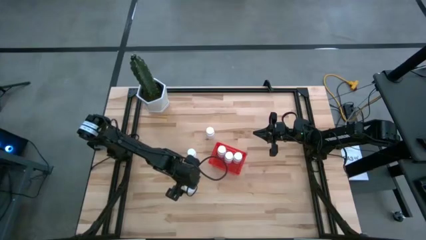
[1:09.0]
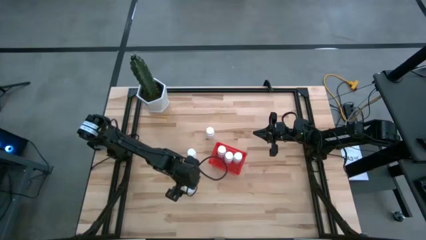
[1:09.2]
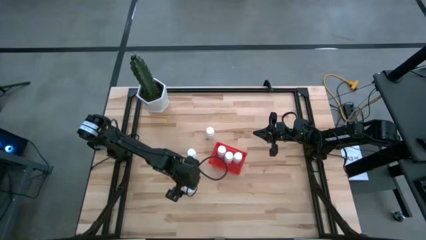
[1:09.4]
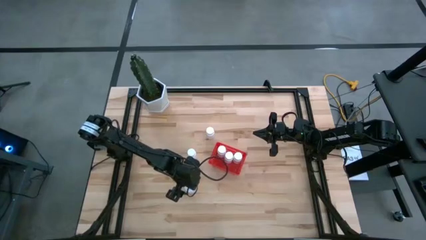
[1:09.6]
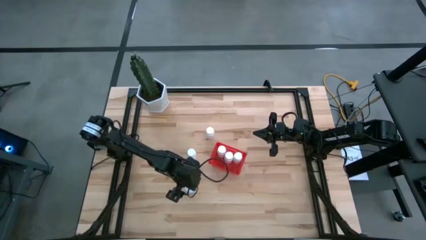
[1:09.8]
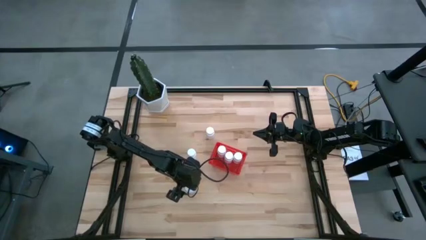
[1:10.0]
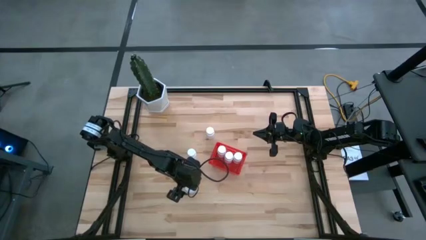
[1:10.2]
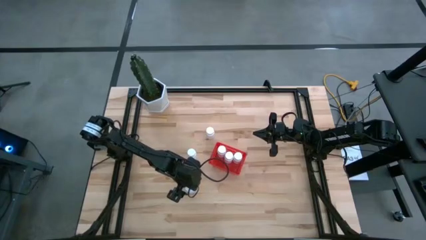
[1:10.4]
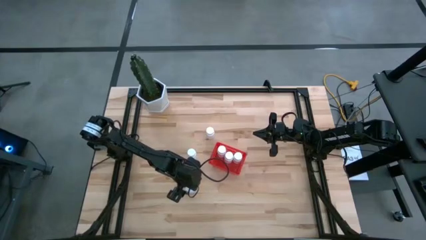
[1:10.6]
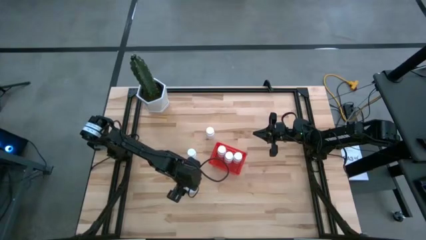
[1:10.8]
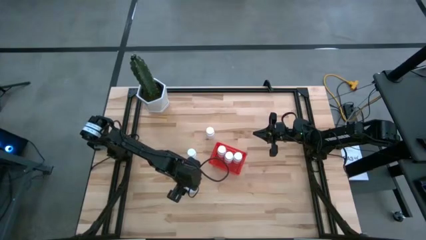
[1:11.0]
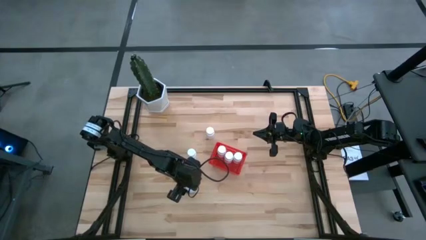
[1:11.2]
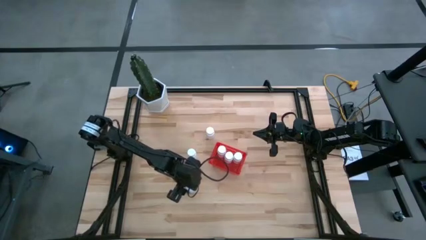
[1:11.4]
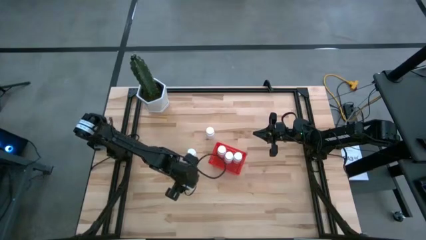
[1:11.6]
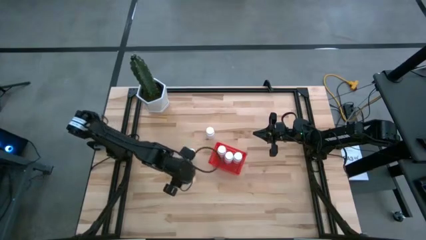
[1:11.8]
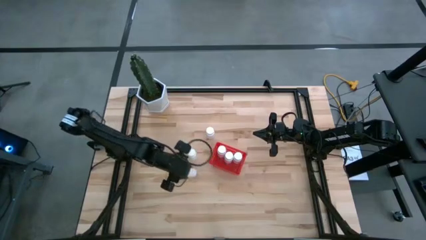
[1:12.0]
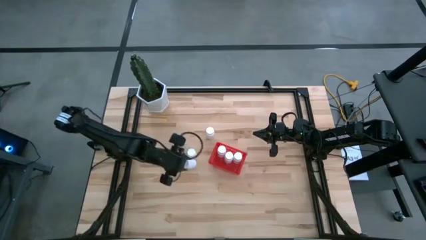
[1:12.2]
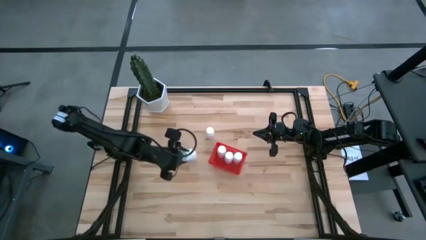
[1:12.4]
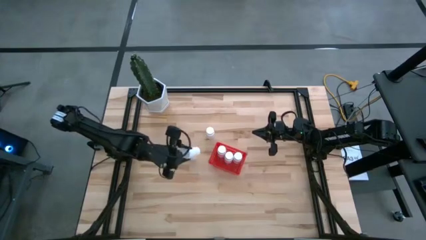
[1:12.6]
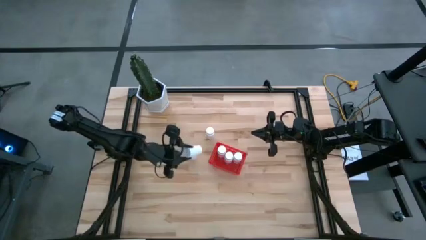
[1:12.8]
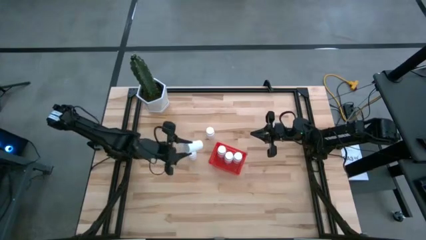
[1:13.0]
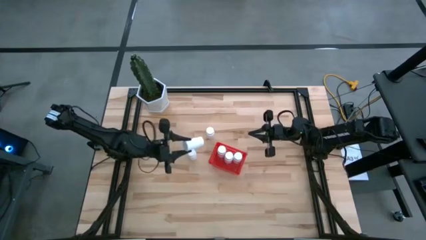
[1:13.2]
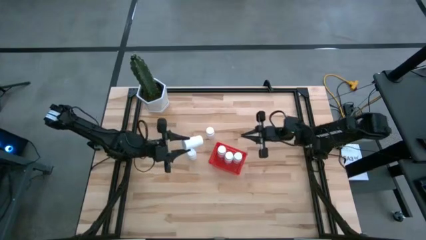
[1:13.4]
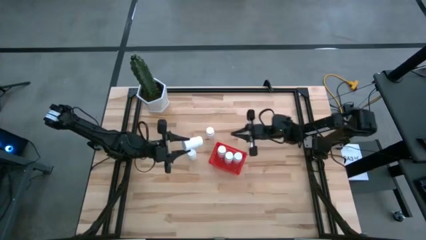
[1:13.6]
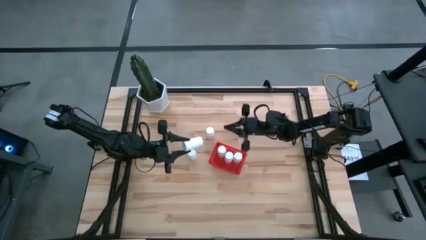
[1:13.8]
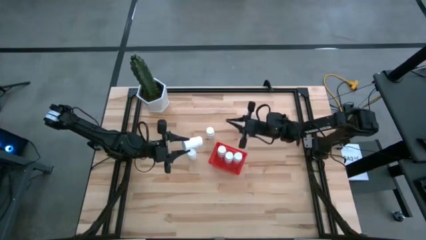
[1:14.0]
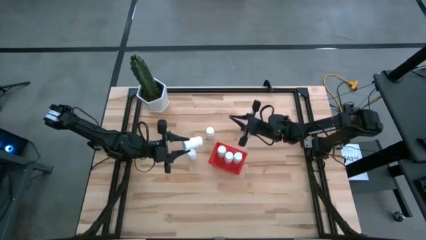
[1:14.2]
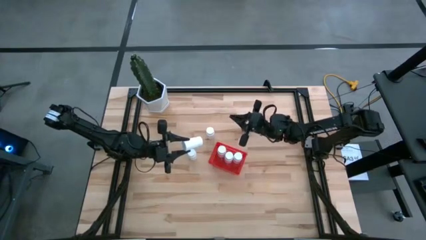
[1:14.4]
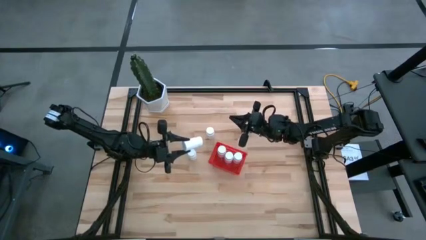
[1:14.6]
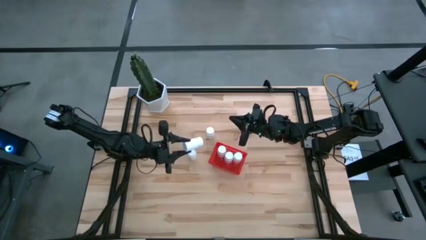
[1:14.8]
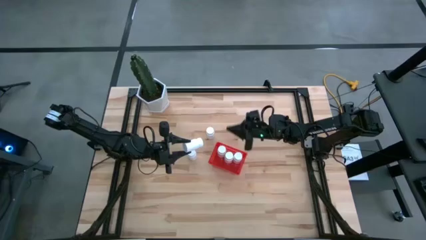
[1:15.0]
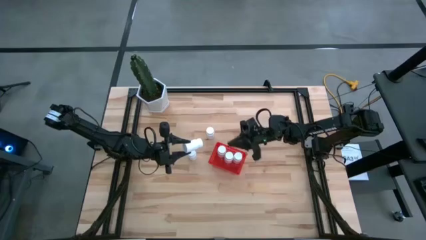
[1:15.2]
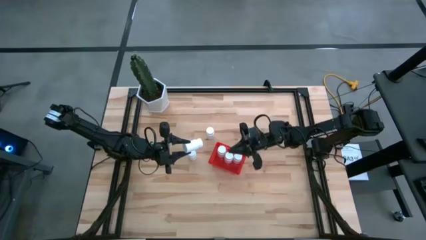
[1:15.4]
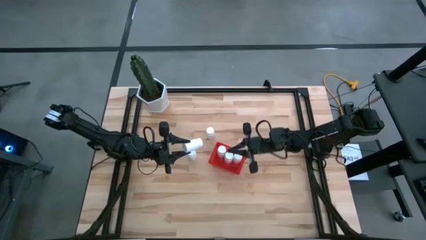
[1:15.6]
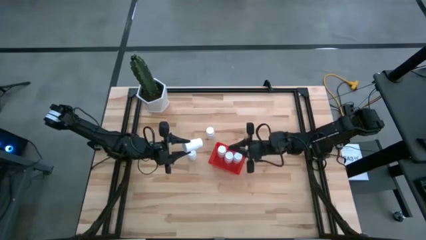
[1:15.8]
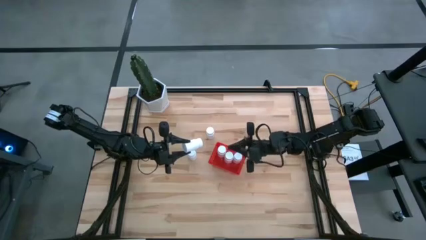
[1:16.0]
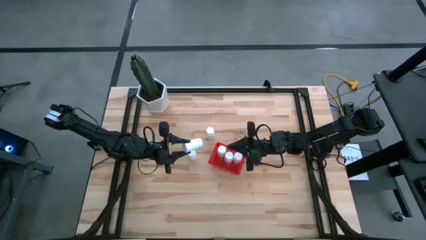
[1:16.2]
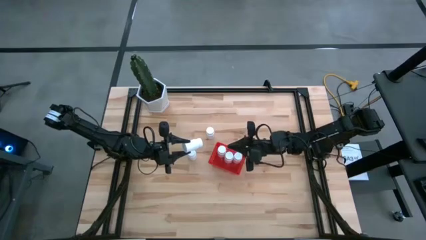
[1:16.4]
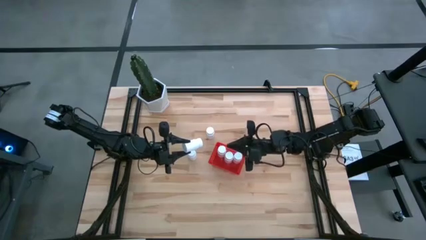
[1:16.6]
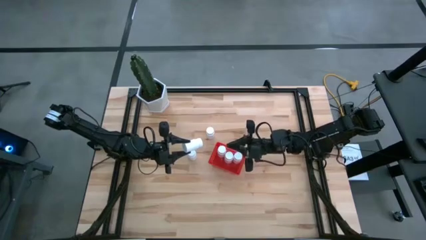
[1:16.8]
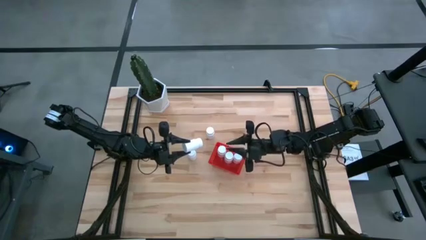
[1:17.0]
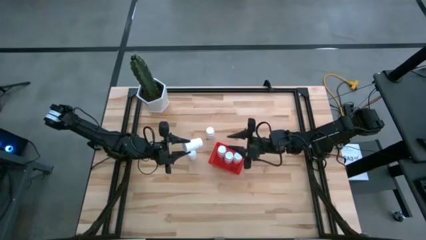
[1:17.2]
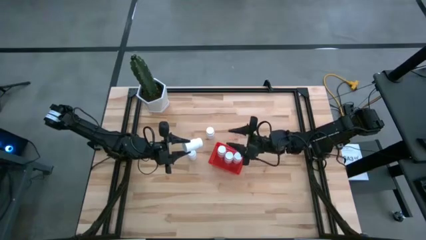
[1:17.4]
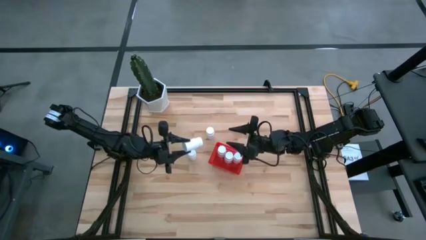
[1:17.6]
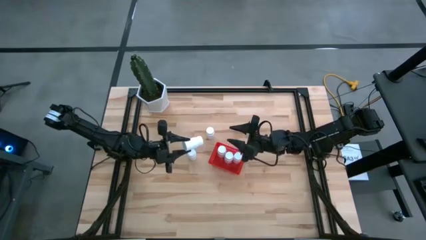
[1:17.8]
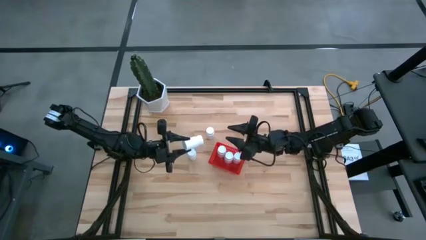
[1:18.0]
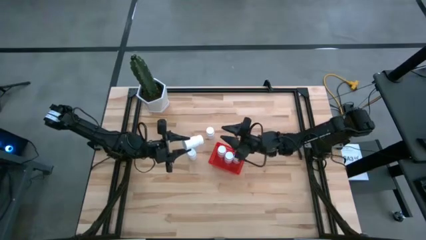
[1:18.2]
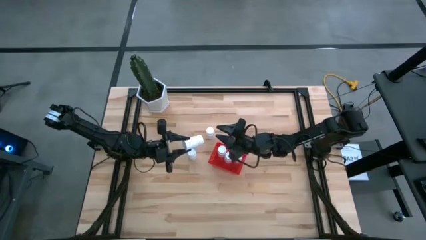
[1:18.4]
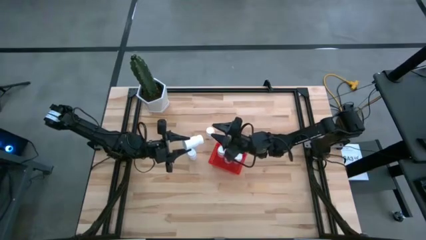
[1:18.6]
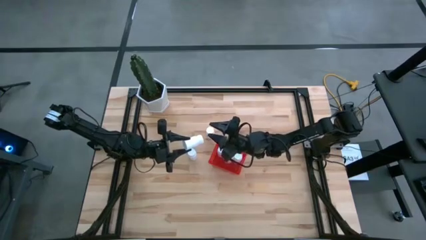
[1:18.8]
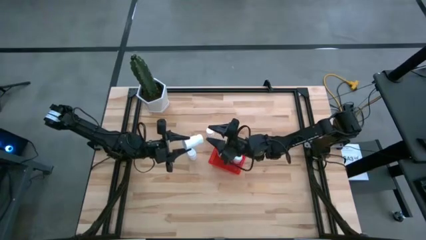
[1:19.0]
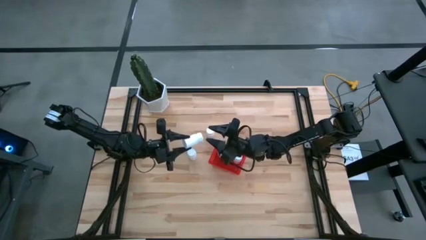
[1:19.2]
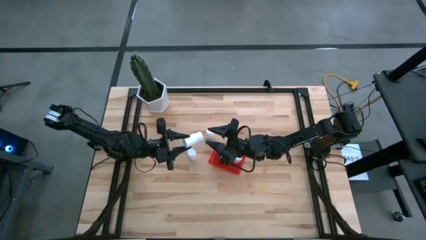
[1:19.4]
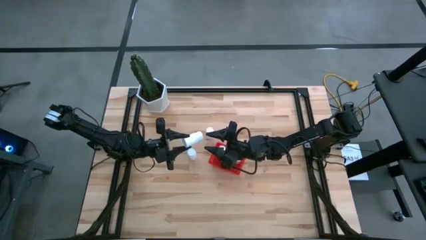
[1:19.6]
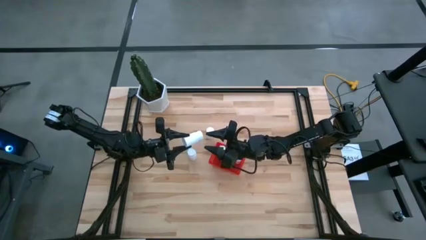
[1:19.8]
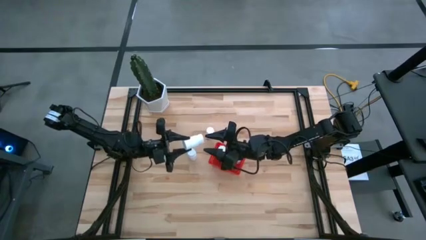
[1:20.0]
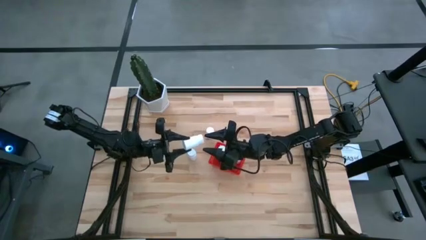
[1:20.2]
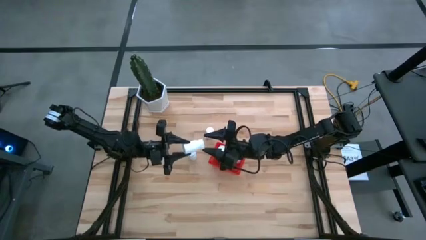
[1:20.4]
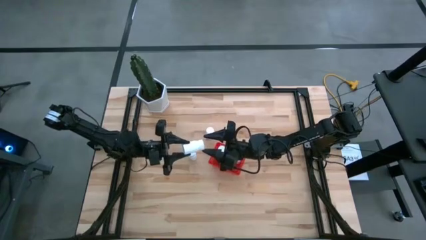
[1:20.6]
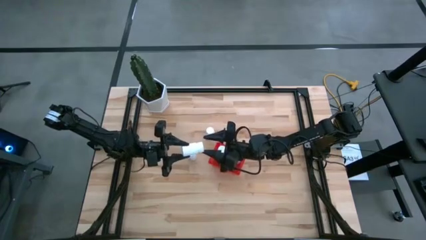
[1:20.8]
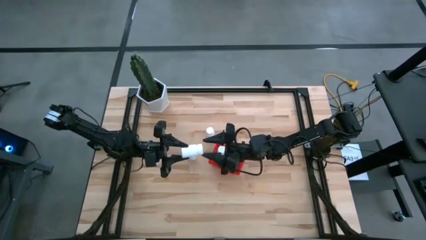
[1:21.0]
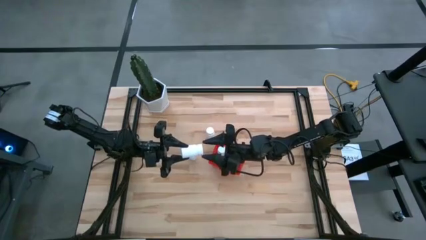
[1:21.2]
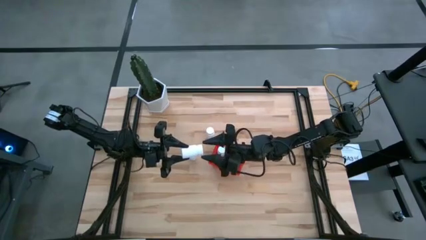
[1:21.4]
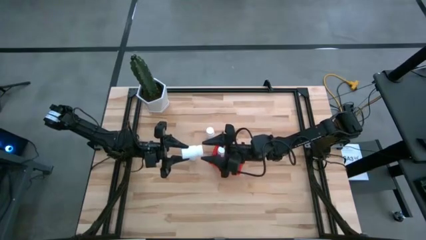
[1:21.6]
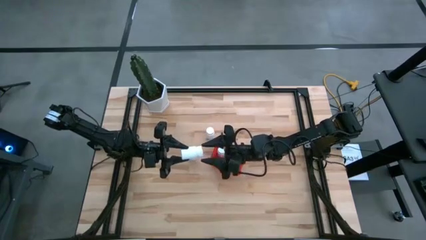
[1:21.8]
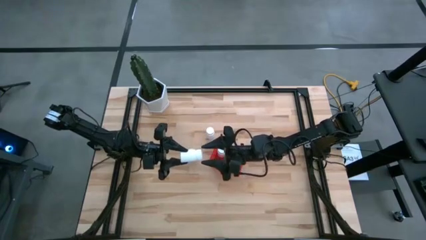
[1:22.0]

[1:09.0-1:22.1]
Task: Pick and place pill bottles into a basket
Put the white pill bottle into the red bin
